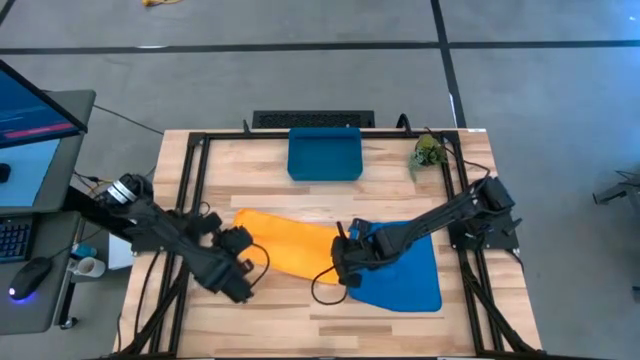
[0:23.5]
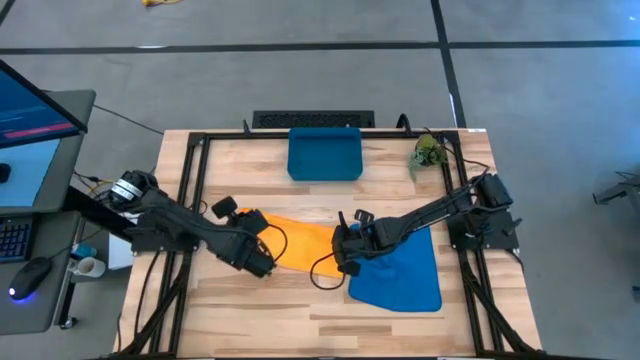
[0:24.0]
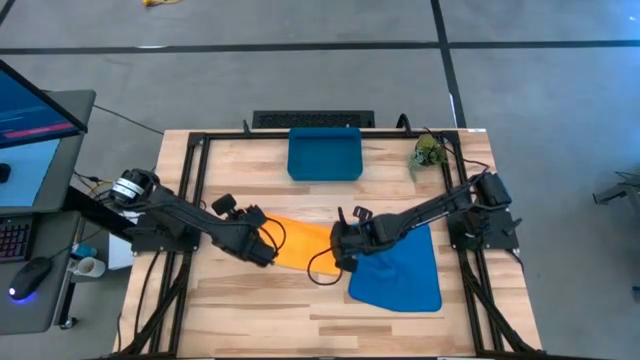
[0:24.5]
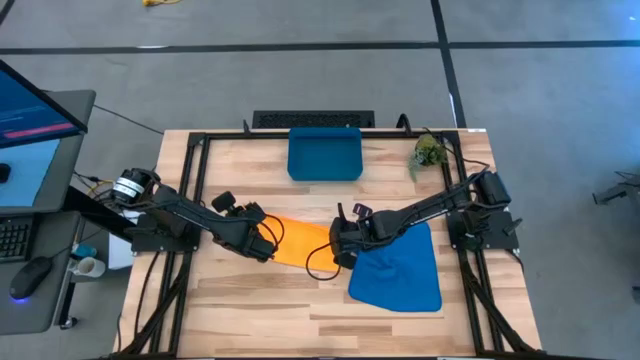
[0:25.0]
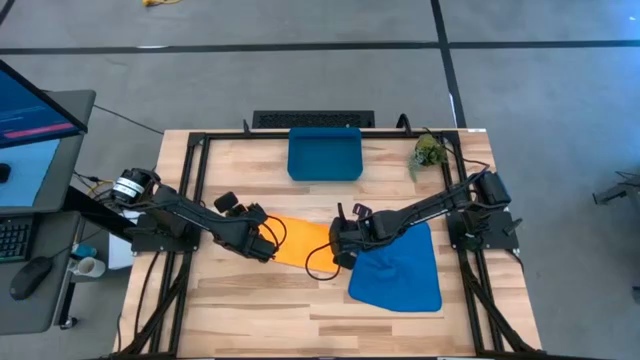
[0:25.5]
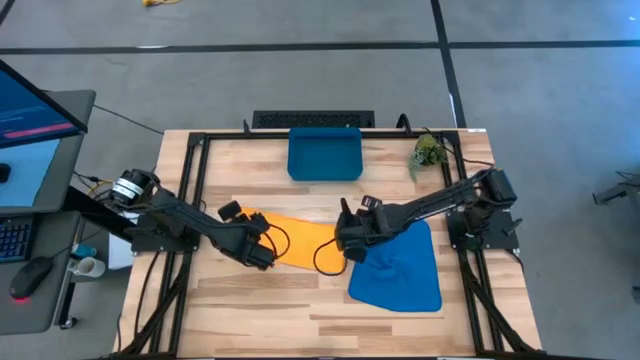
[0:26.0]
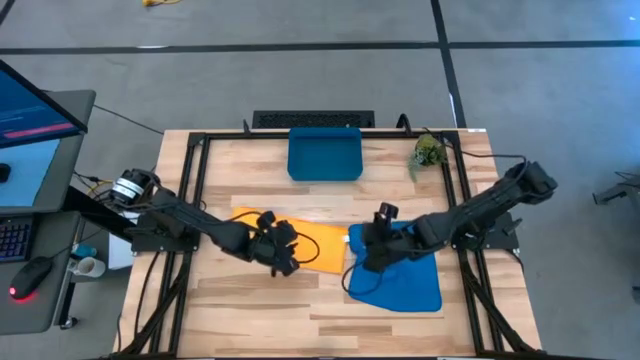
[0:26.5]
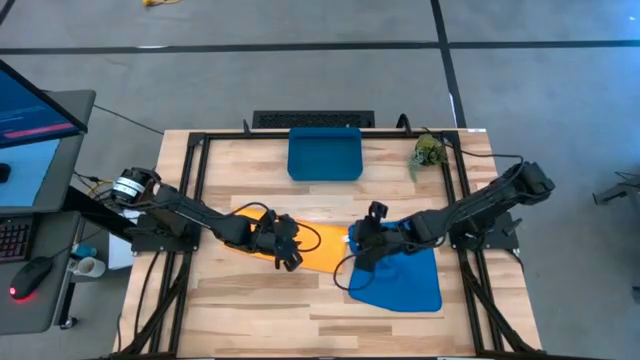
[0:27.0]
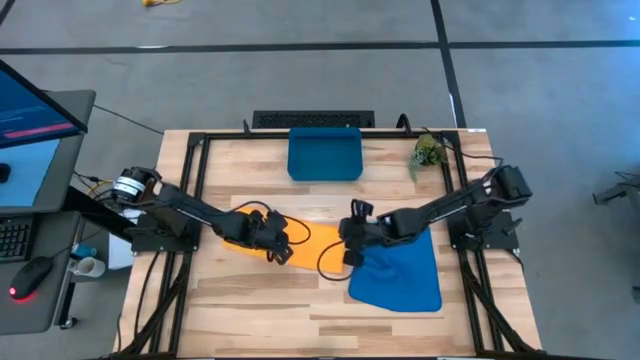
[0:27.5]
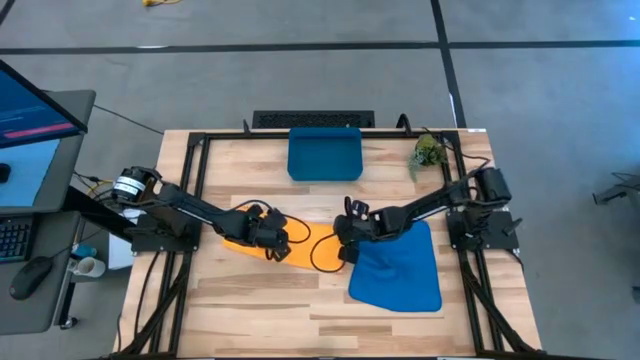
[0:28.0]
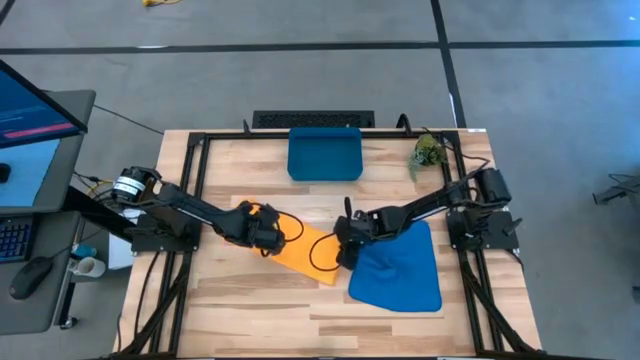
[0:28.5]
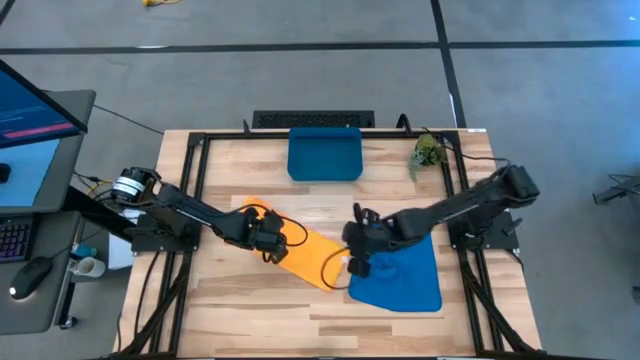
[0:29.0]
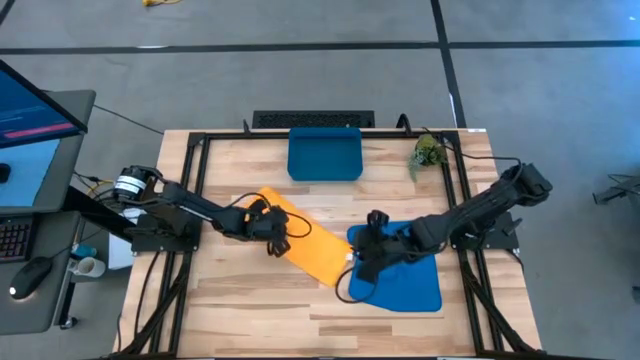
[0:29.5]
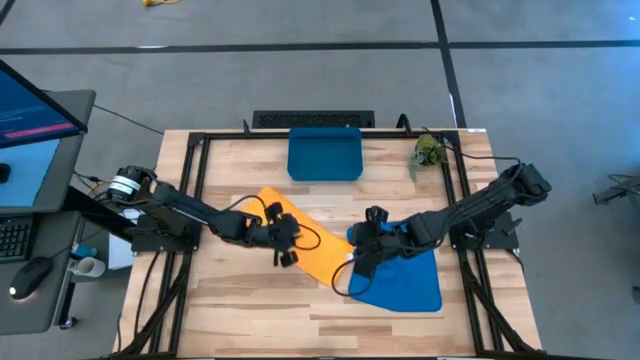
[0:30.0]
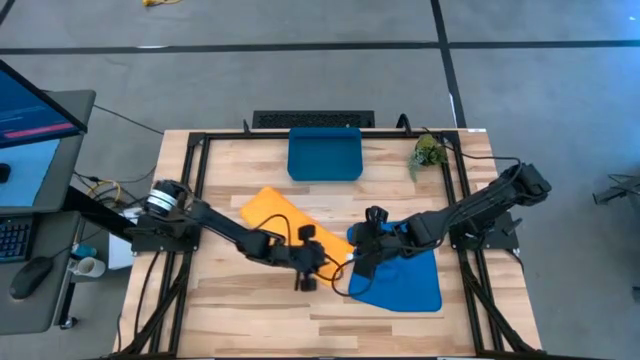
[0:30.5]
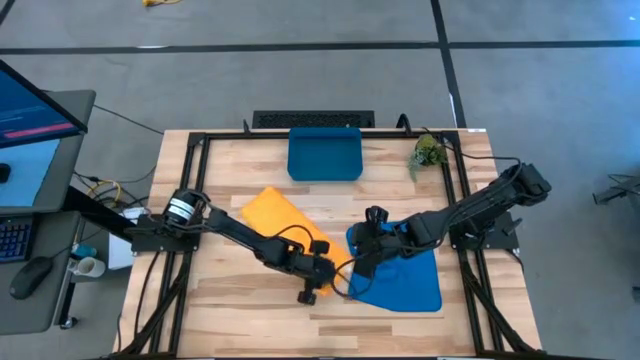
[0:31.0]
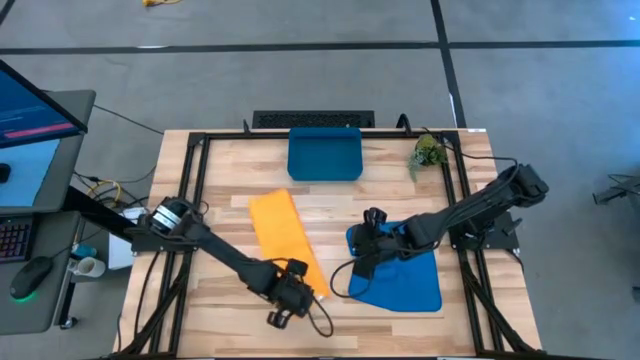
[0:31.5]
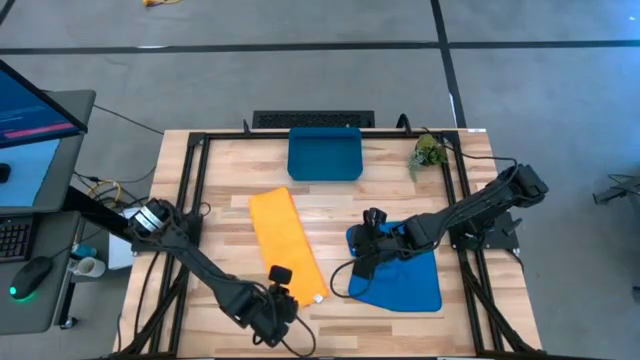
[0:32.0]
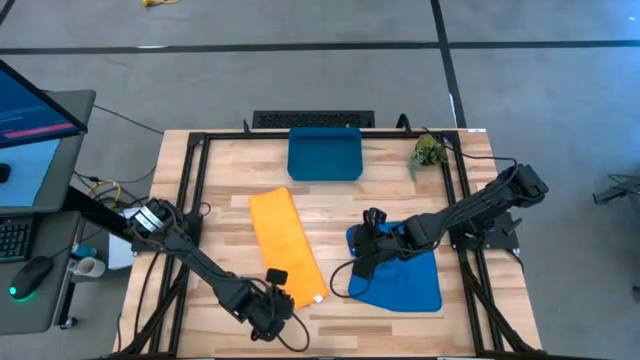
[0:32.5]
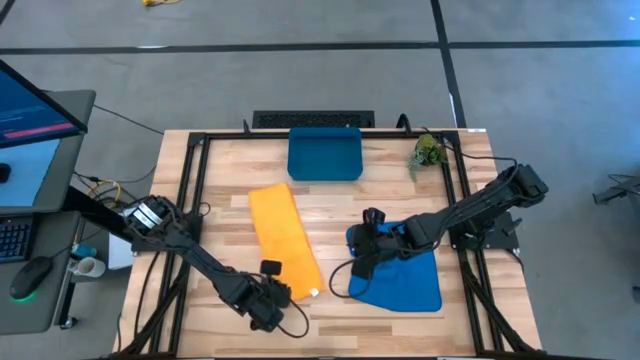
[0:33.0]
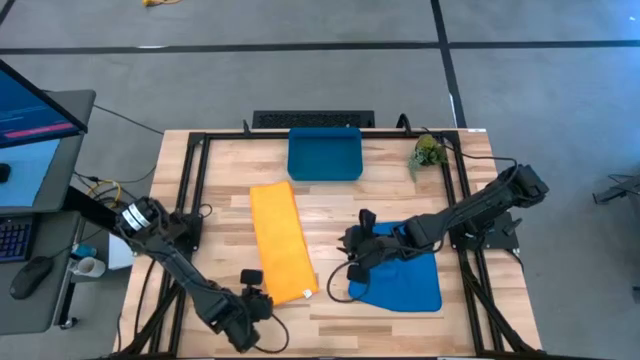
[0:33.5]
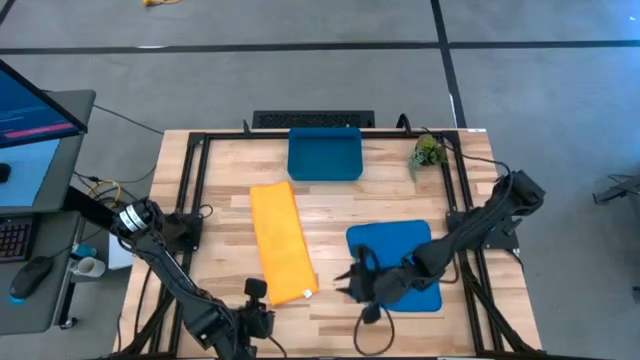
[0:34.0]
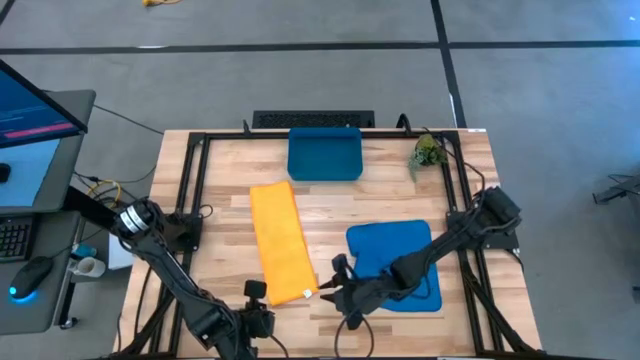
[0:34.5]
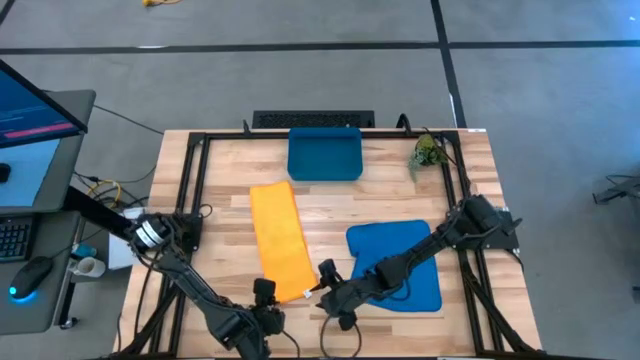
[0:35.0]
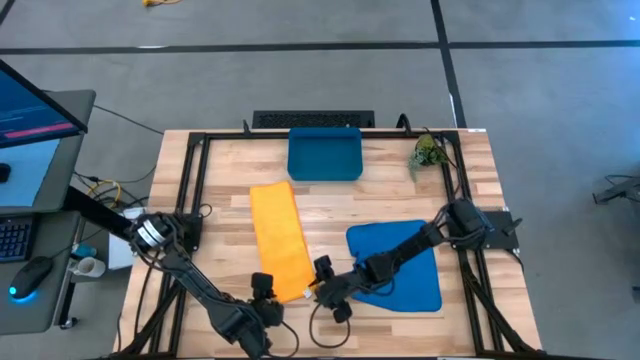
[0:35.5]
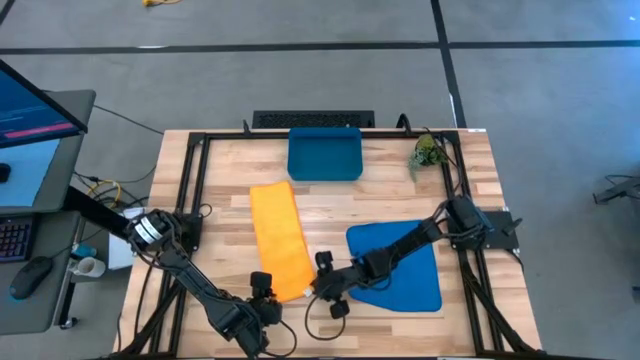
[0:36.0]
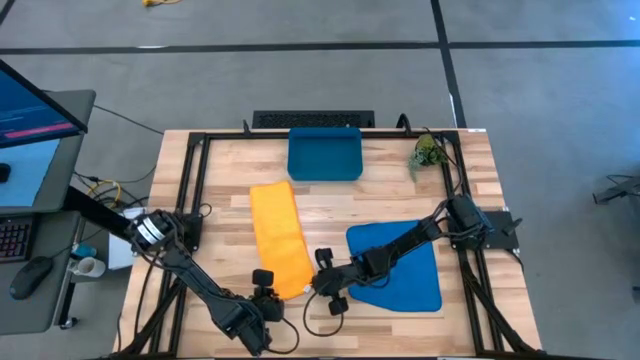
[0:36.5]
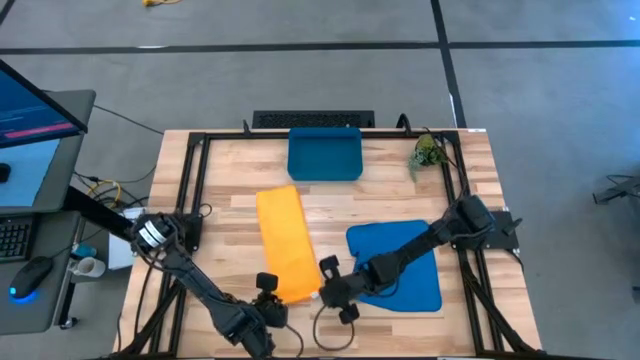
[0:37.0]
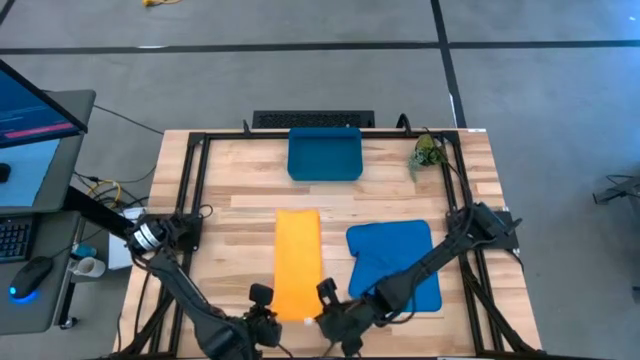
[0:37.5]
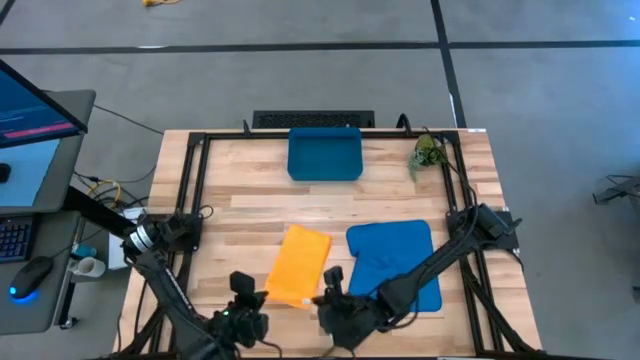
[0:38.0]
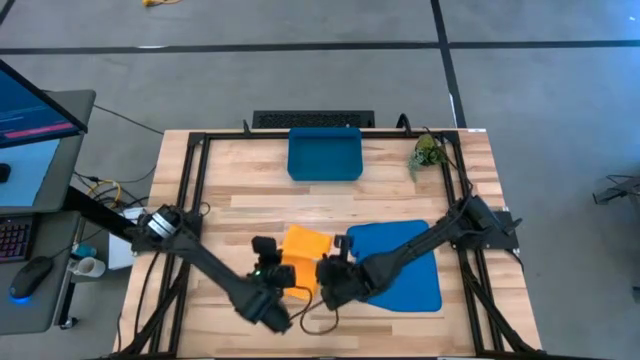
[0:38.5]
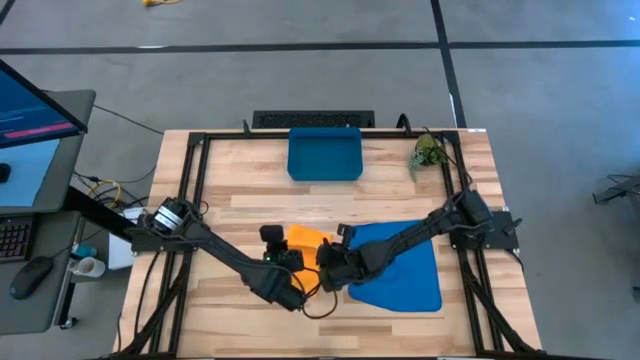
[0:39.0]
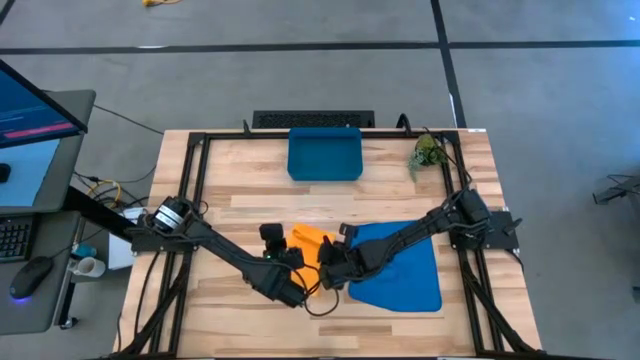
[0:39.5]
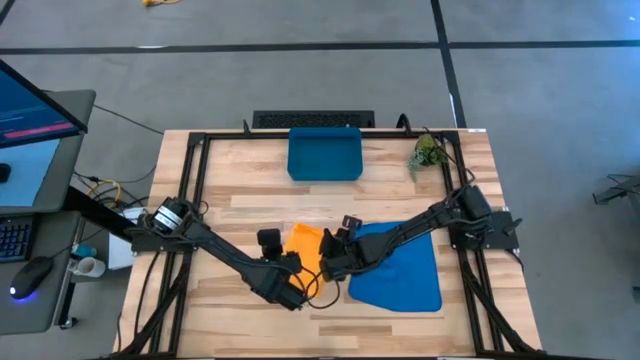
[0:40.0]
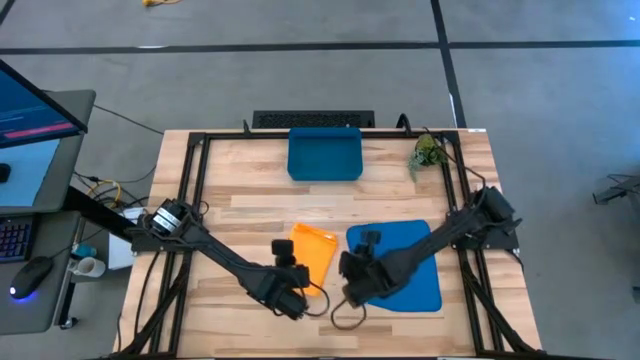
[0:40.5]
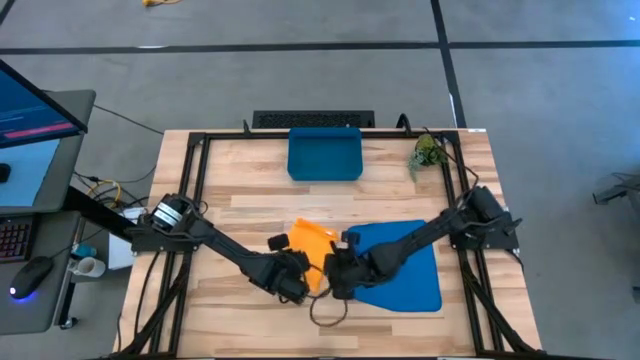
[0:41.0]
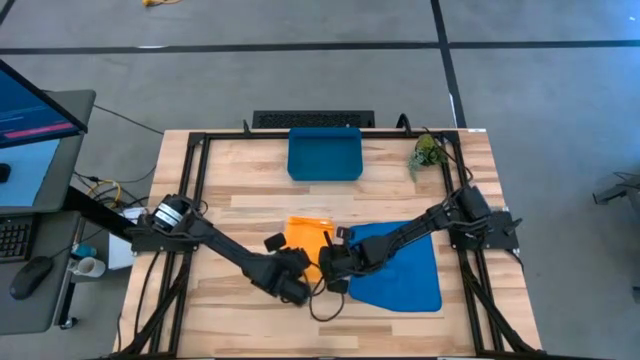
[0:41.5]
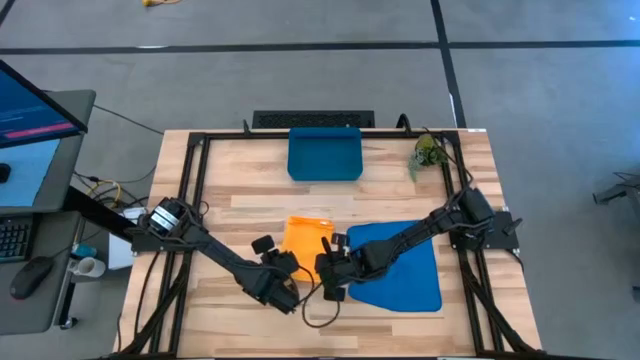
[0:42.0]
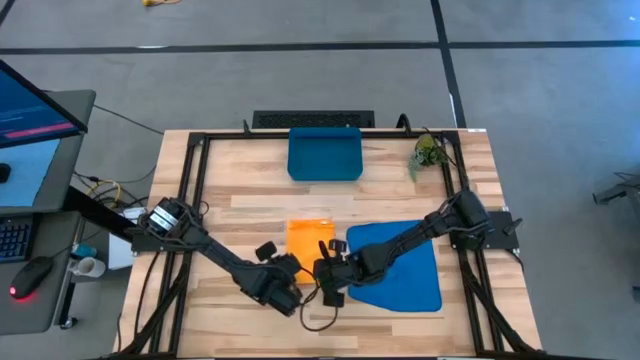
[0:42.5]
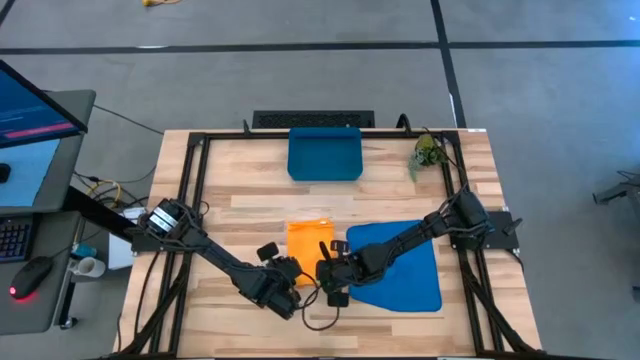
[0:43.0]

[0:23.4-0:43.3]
Task: Roll microfiber towels into tight, uniform cylinder then place into a basket
Fold the yellow microfiber cloth

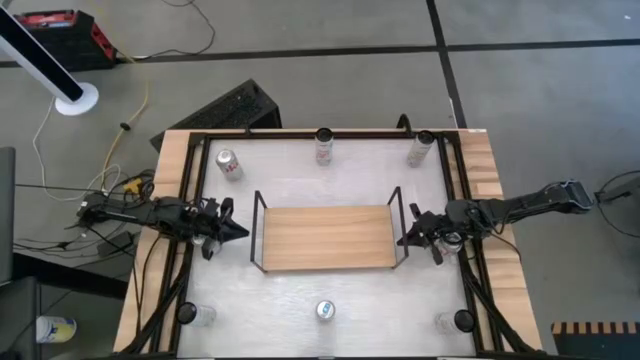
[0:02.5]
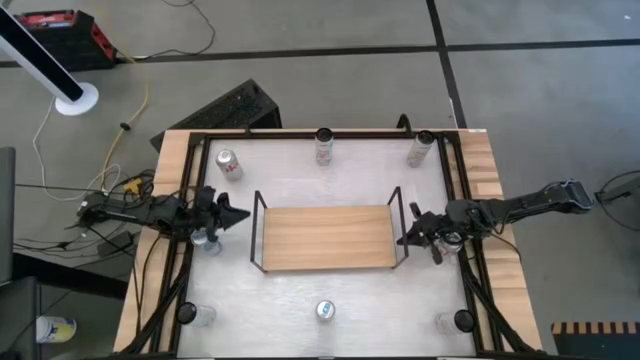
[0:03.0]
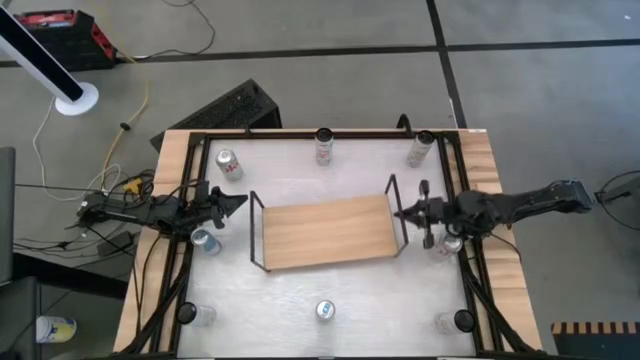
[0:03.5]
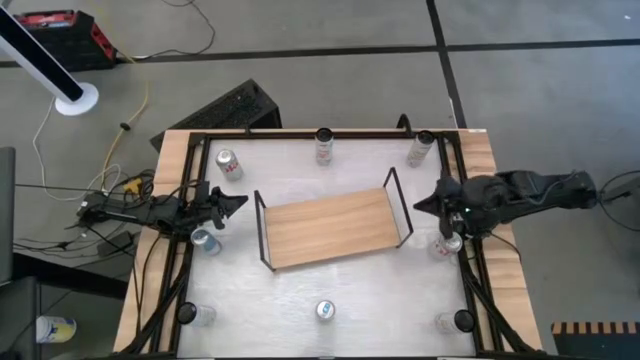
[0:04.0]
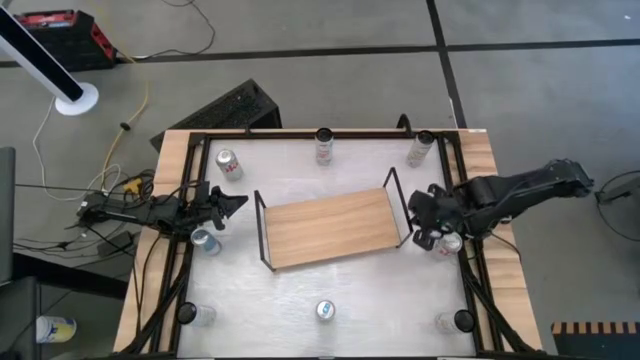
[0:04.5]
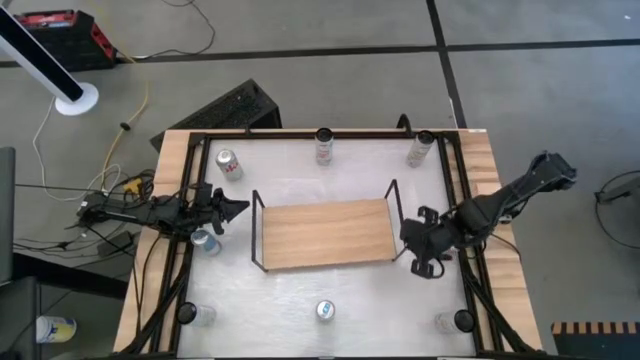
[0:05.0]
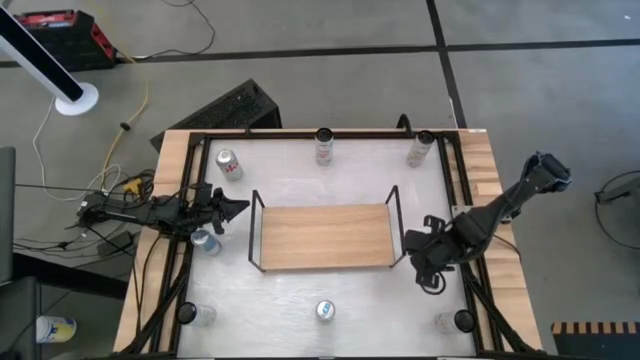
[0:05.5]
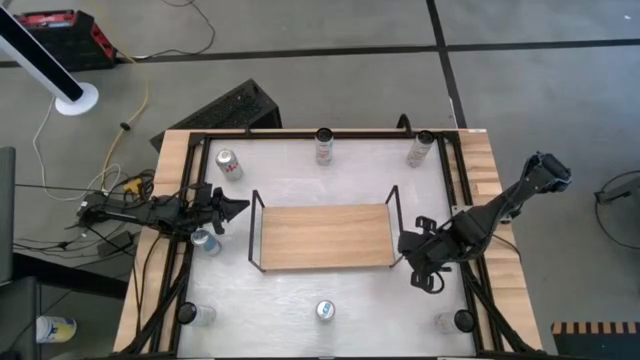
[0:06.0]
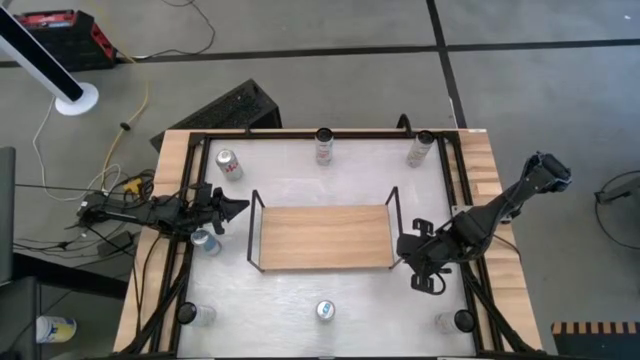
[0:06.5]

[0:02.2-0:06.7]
Task: Place canned beverage on shelf
Adjust the shelf
